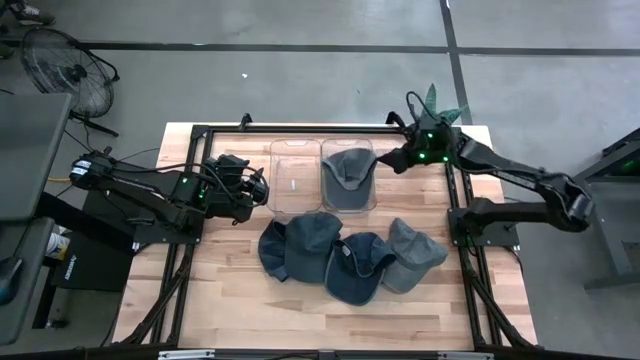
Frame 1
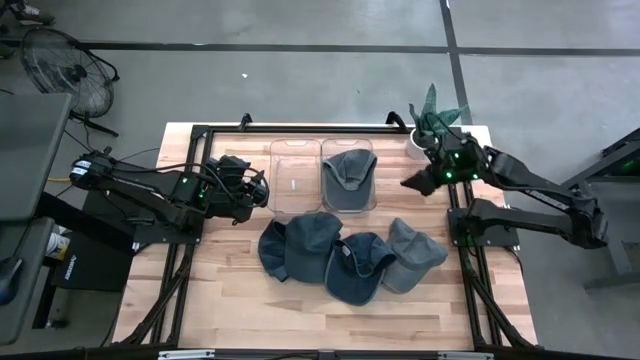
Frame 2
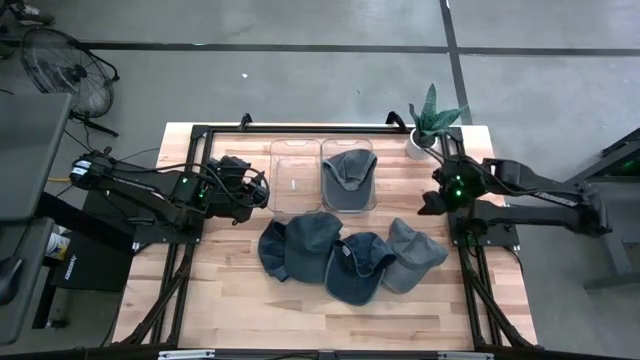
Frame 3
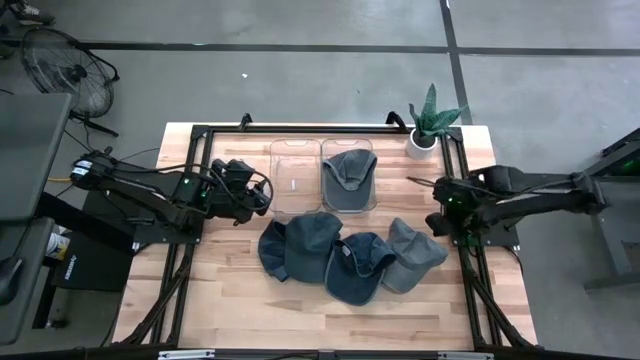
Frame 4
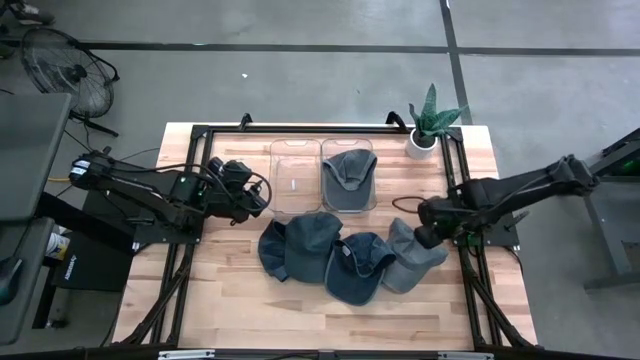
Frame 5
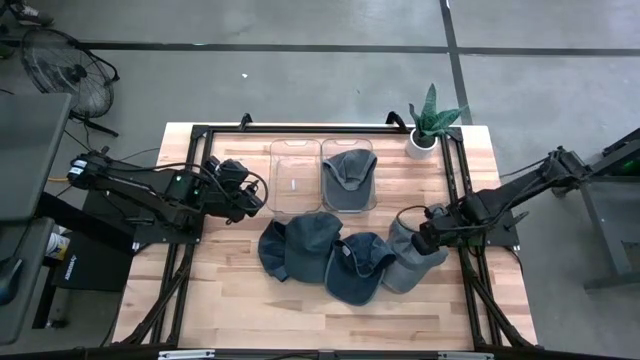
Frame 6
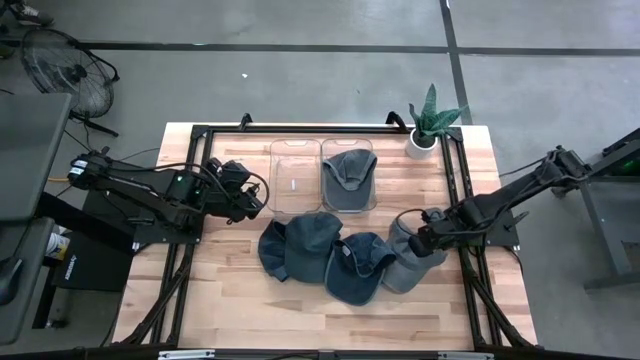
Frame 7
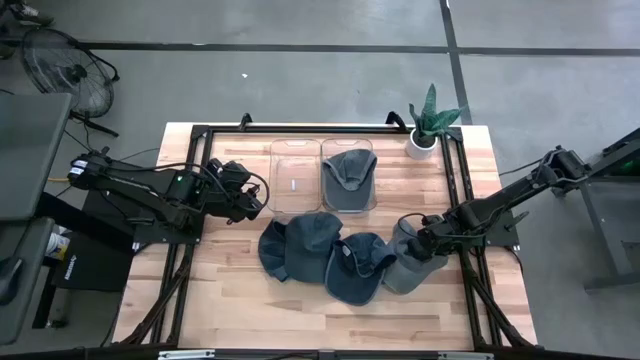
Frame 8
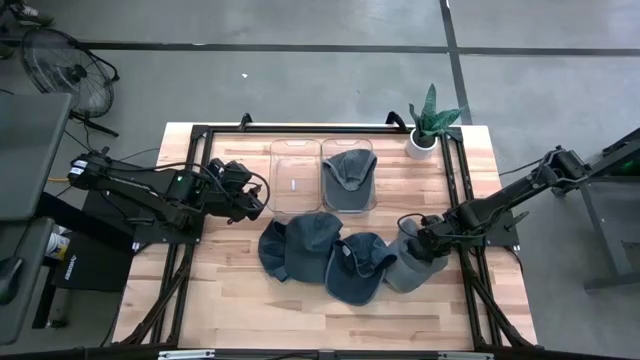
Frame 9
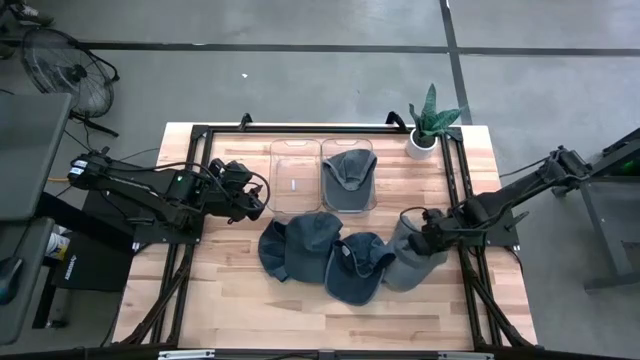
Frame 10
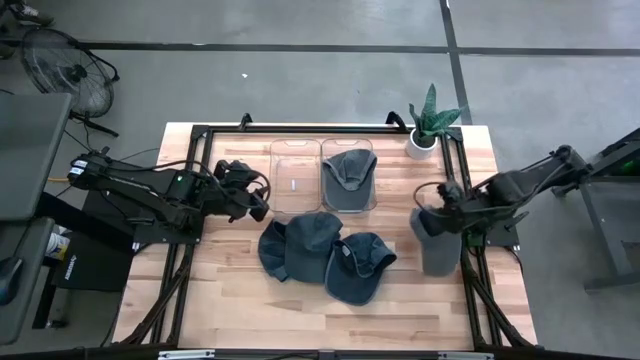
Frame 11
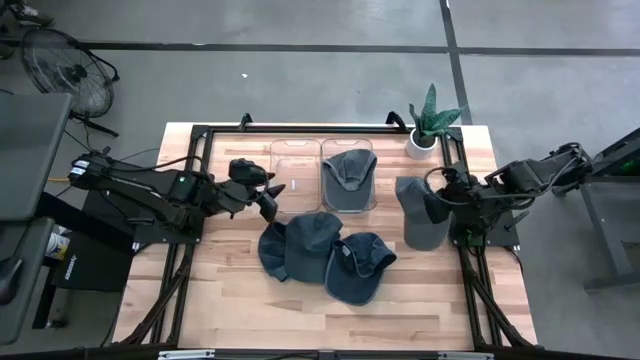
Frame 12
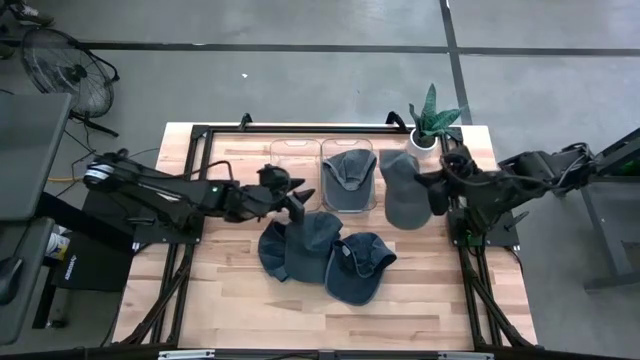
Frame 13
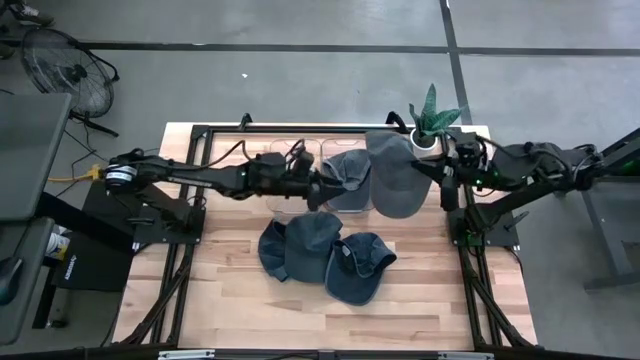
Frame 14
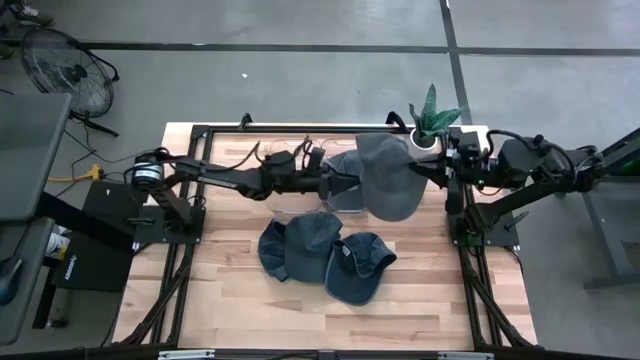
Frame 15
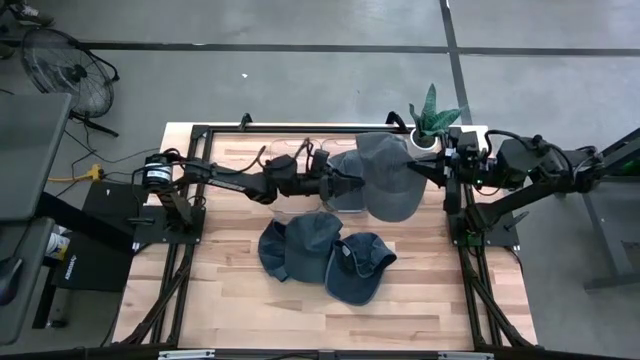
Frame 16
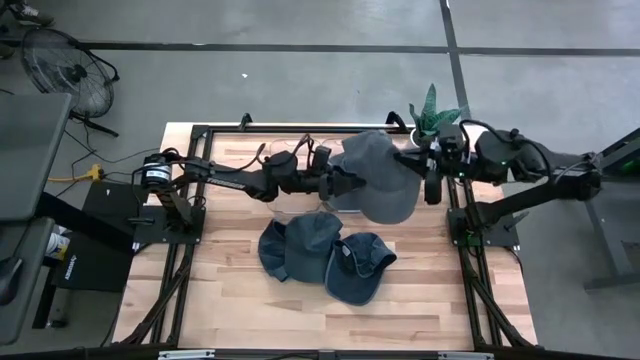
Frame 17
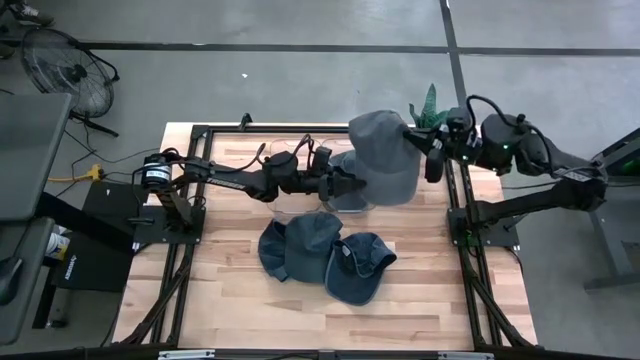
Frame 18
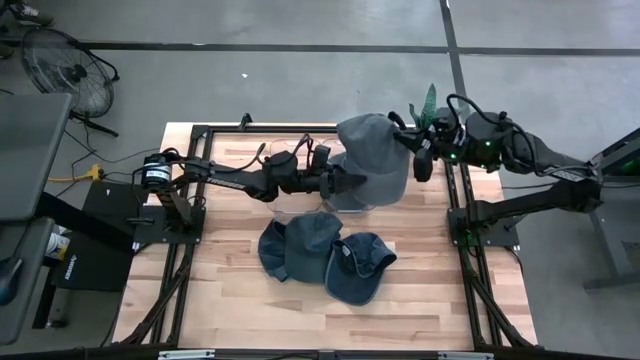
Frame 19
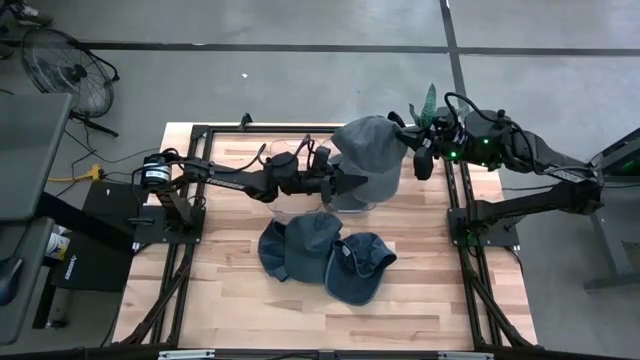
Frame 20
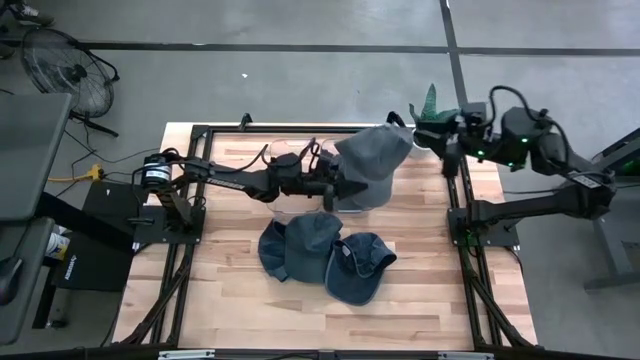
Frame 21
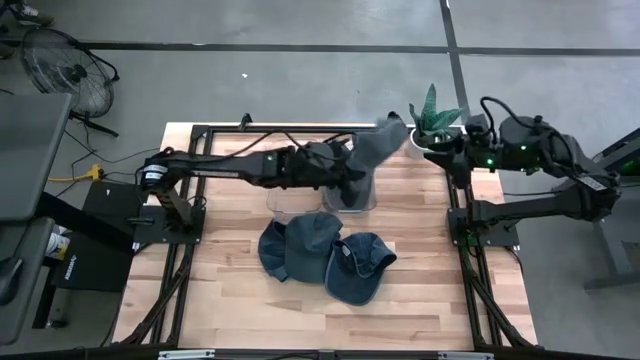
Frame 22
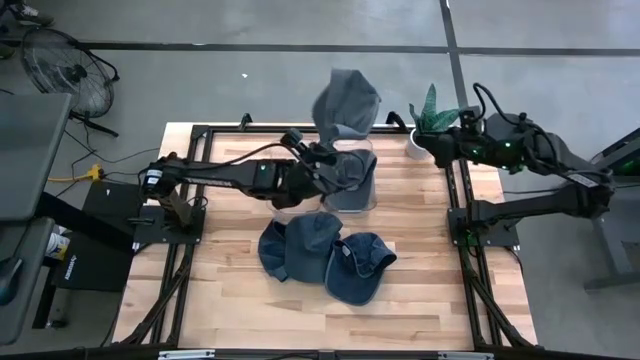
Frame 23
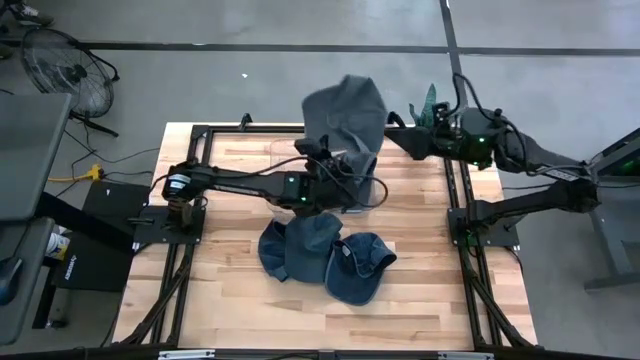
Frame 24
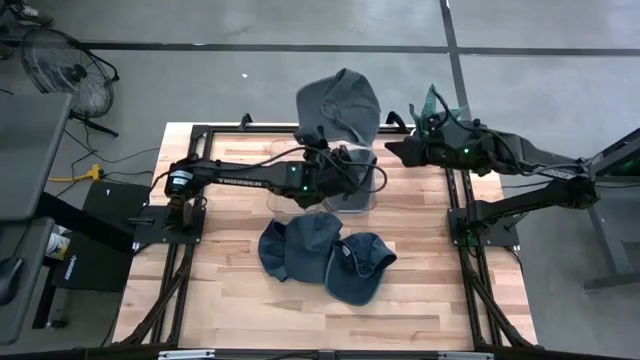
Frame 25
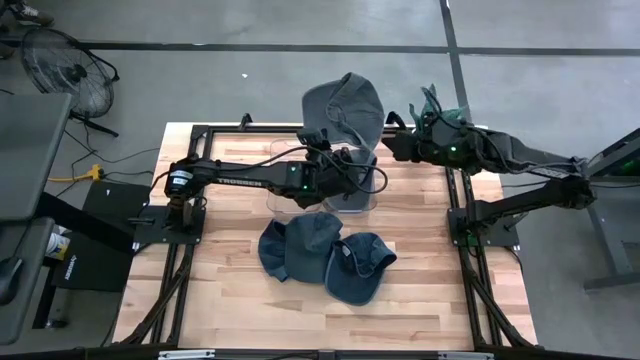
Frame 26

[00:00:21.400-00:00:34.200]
Task: Pick & Place hat
Put the gray cap into the right transparent bin

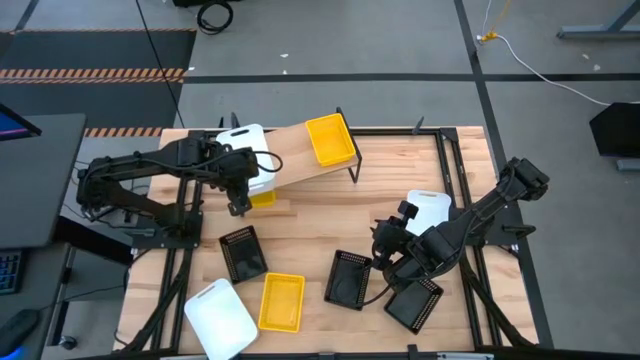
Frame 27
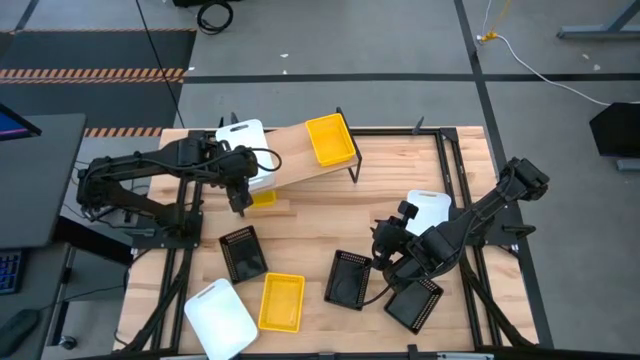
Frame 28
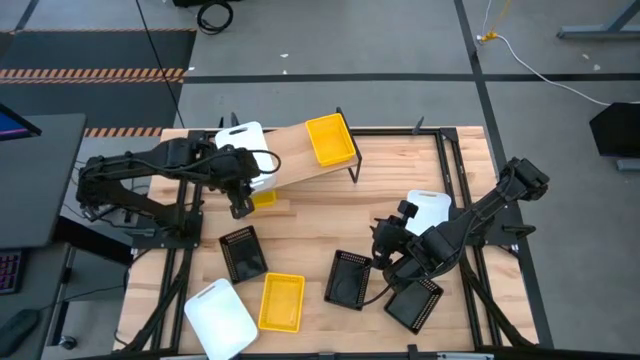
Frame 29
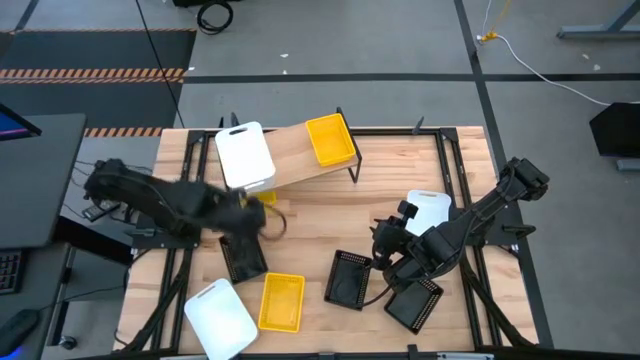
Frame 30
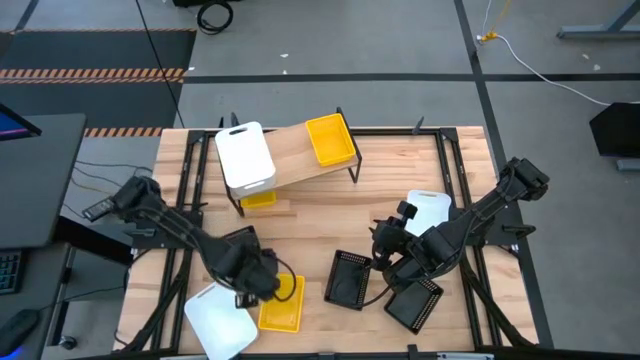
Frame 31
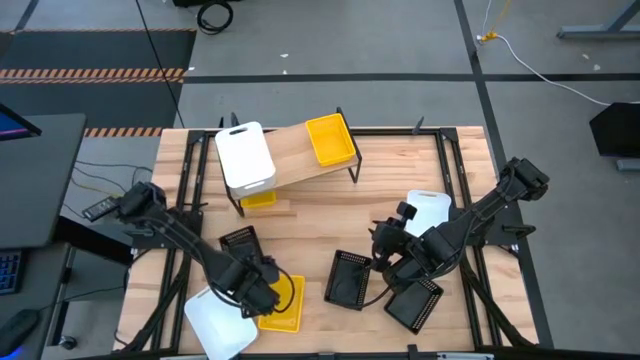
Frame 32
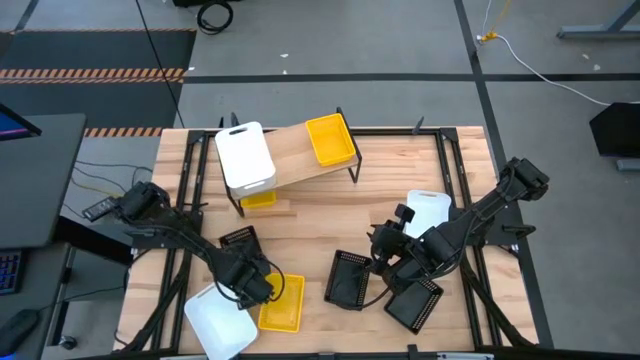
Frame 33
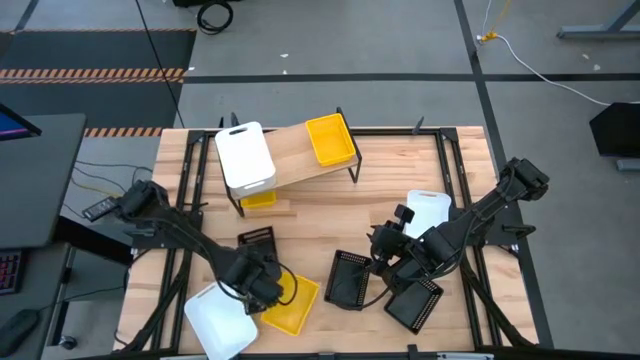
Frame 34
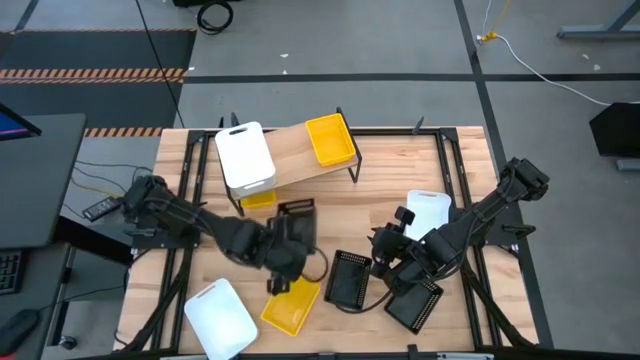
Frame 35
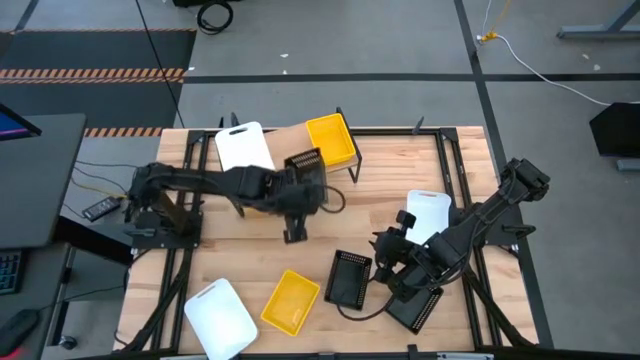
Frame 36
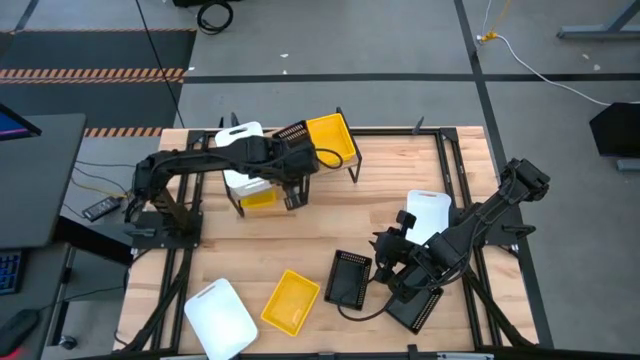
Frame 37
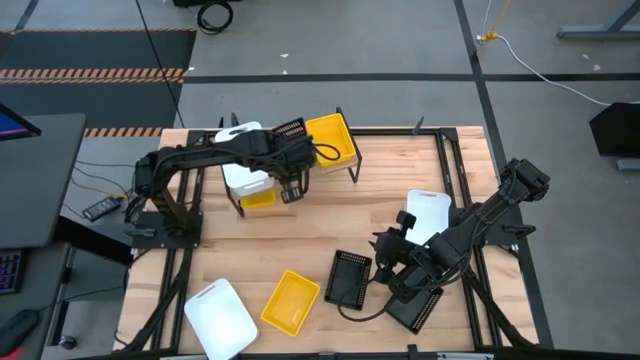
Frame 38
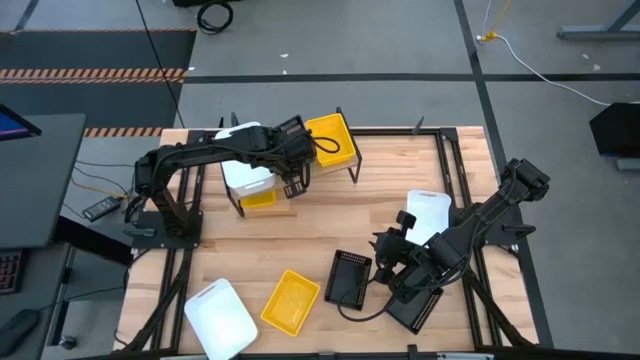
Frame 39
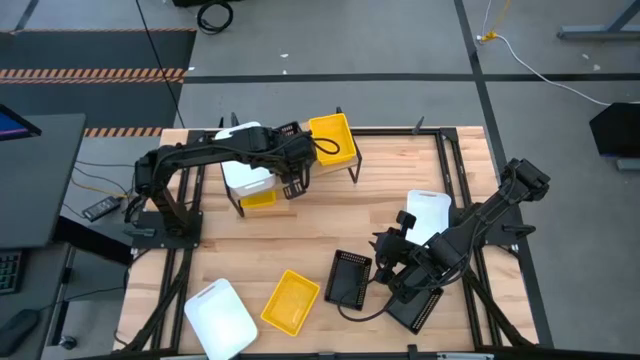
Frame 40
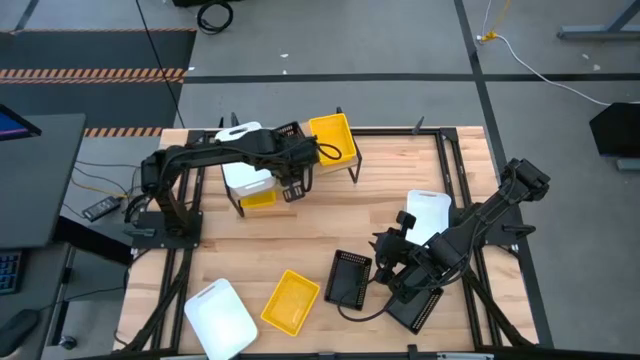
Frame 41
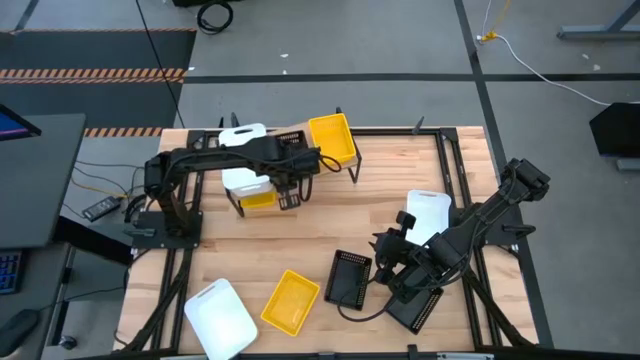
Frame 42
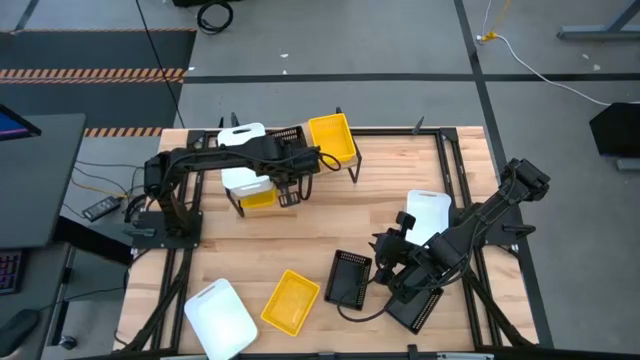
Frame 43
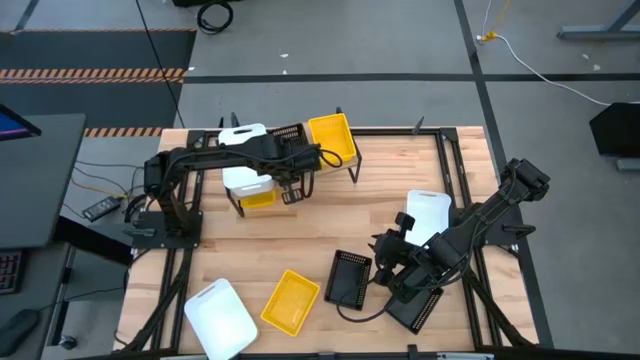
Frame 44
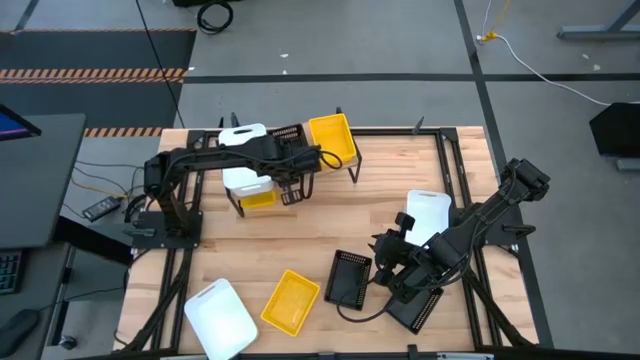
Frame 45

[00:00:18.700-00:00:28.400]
Task: Stack baskets on shelf by color
Put the left black bin on the shelf
